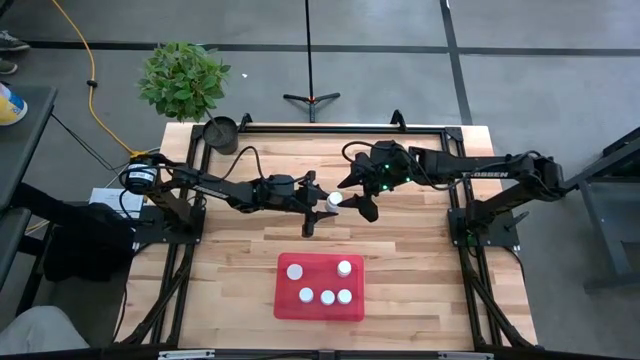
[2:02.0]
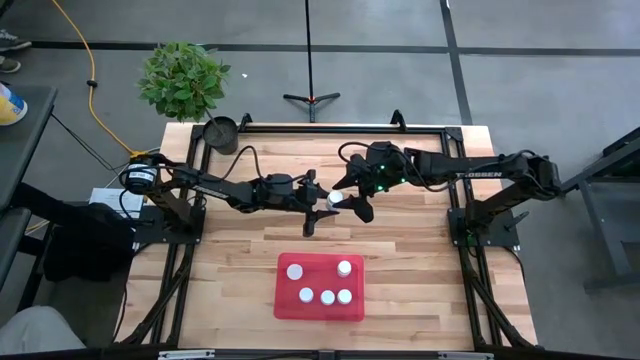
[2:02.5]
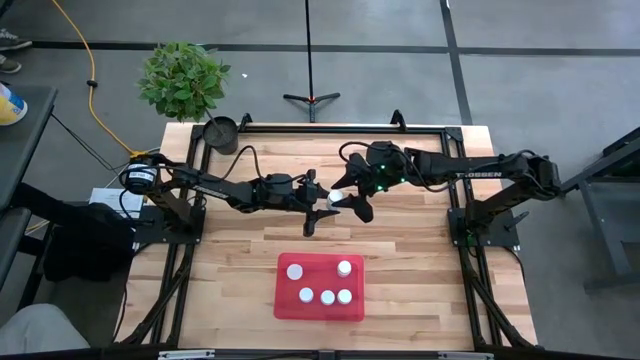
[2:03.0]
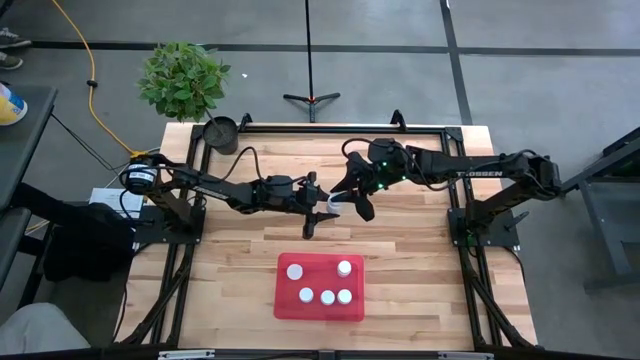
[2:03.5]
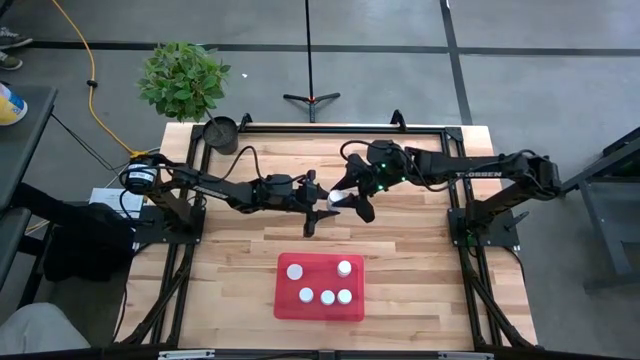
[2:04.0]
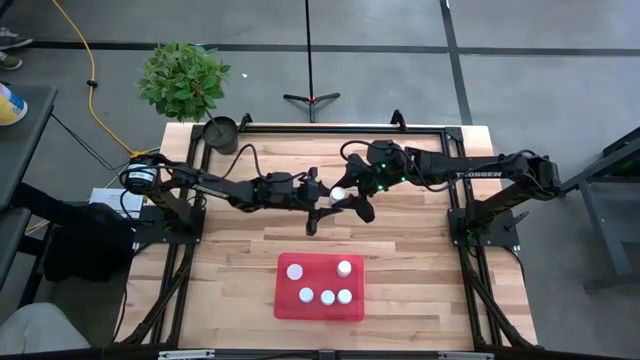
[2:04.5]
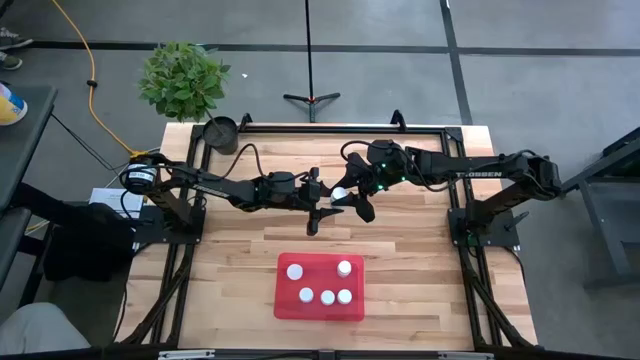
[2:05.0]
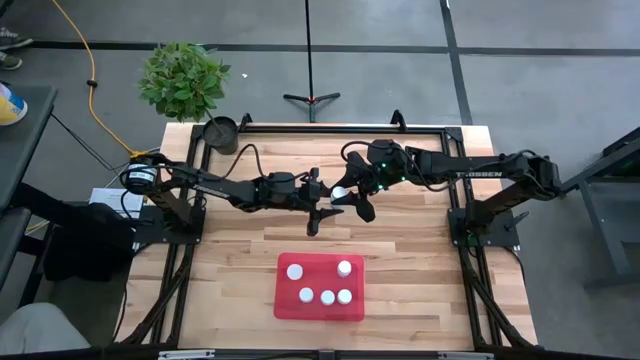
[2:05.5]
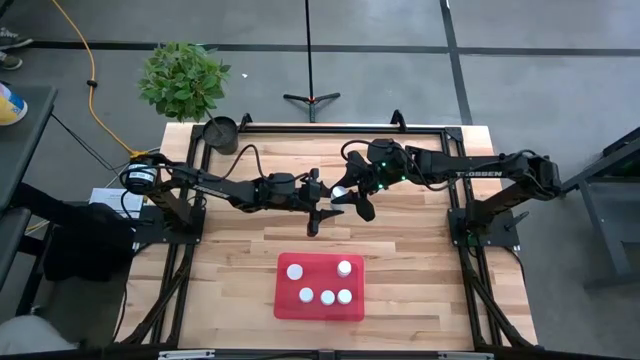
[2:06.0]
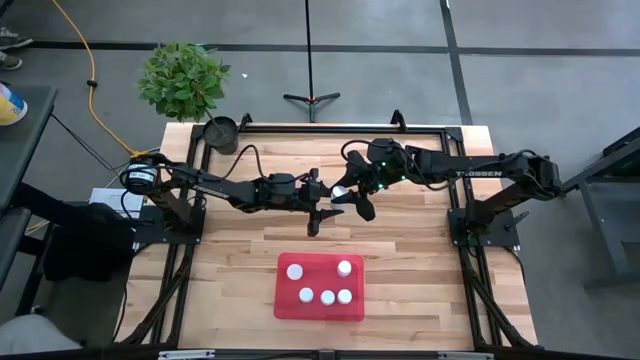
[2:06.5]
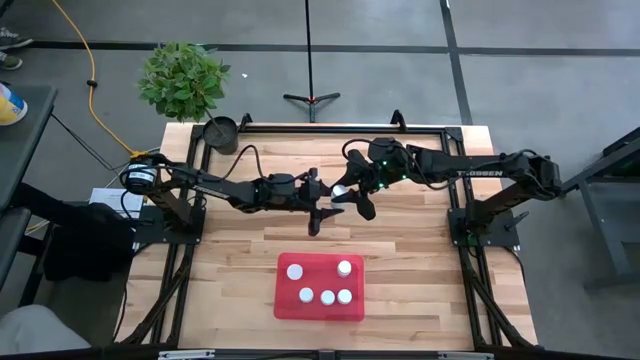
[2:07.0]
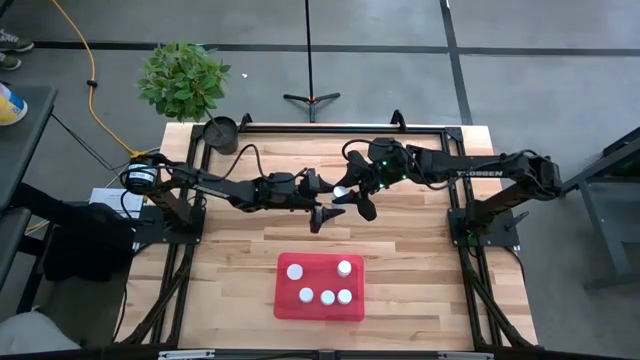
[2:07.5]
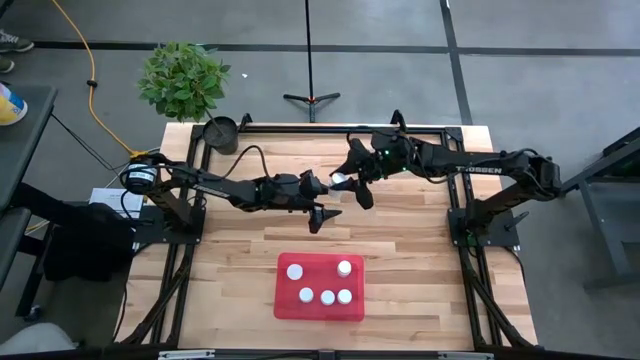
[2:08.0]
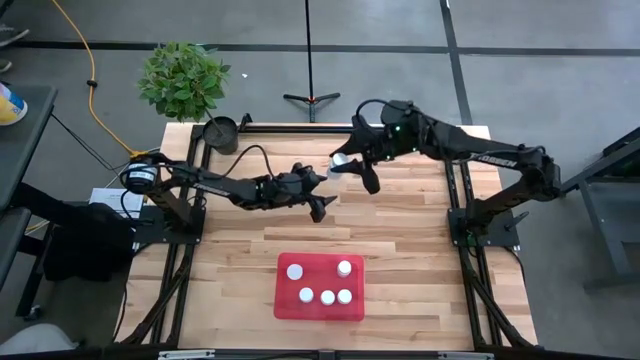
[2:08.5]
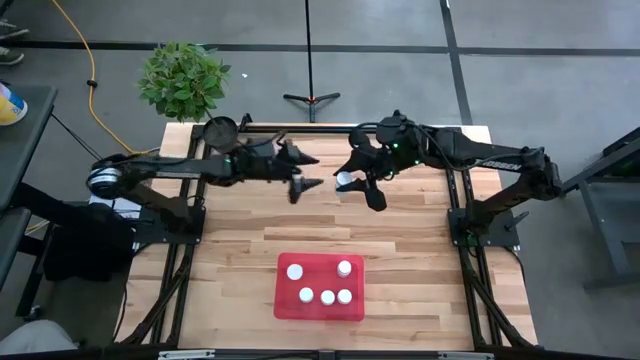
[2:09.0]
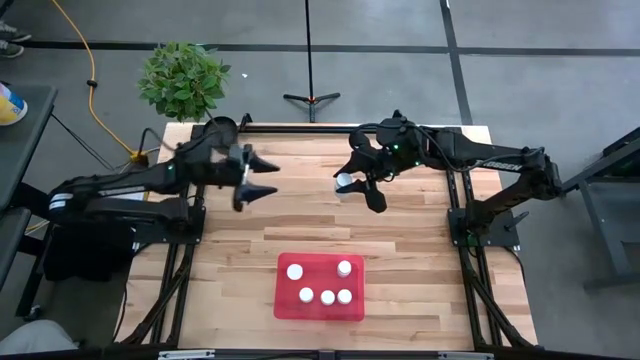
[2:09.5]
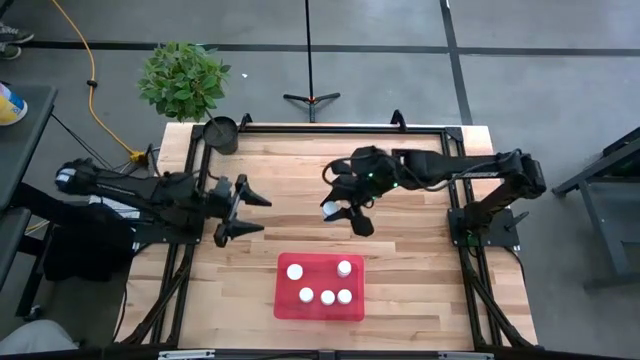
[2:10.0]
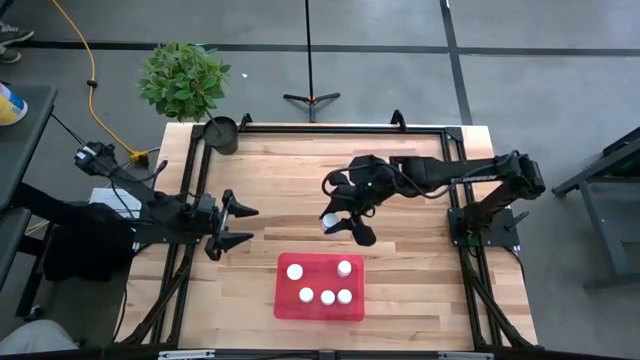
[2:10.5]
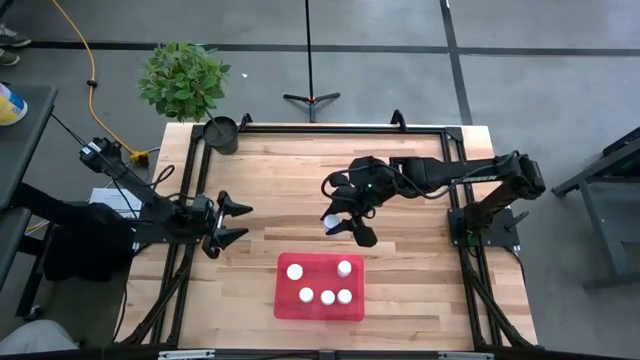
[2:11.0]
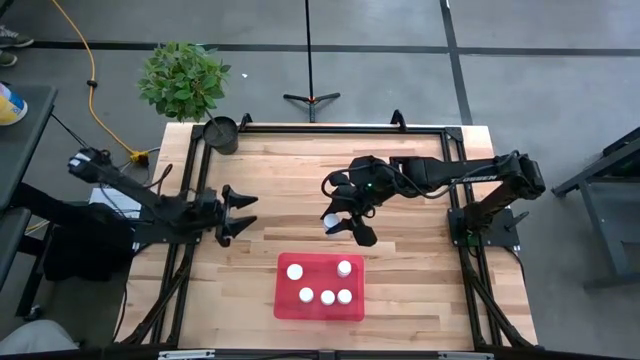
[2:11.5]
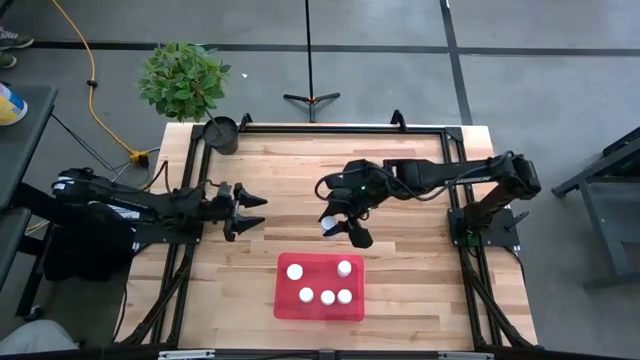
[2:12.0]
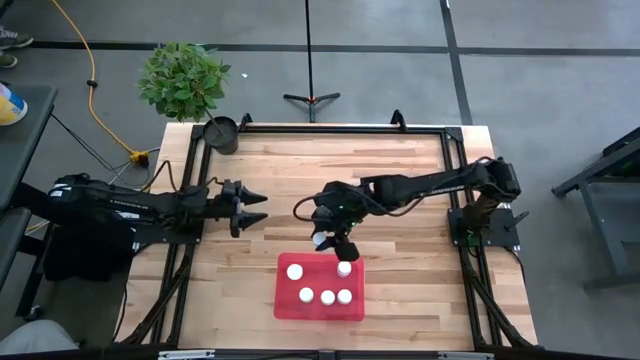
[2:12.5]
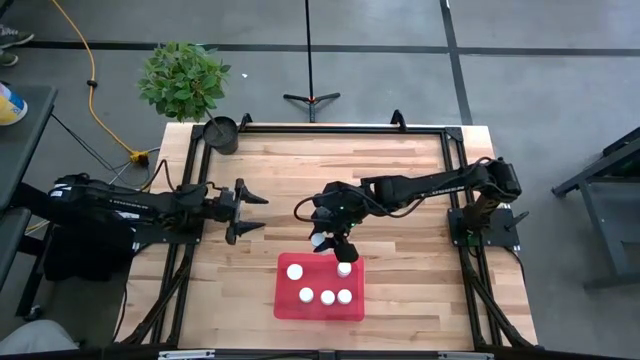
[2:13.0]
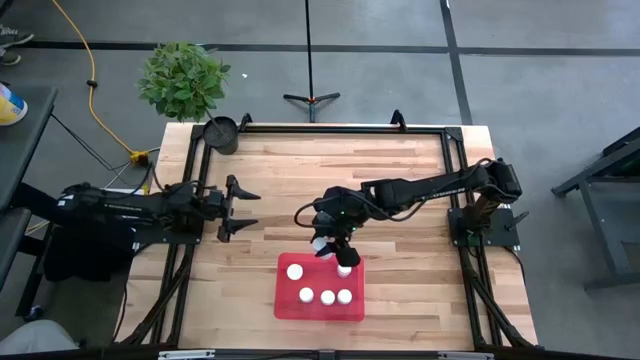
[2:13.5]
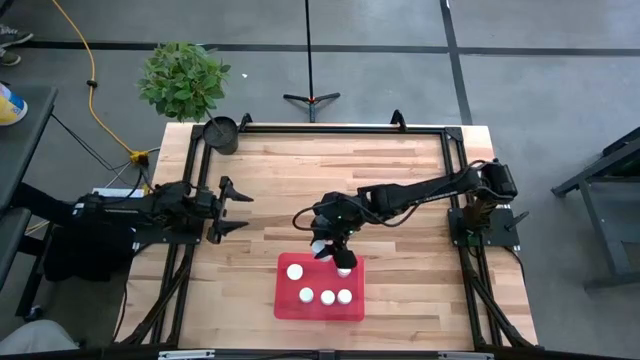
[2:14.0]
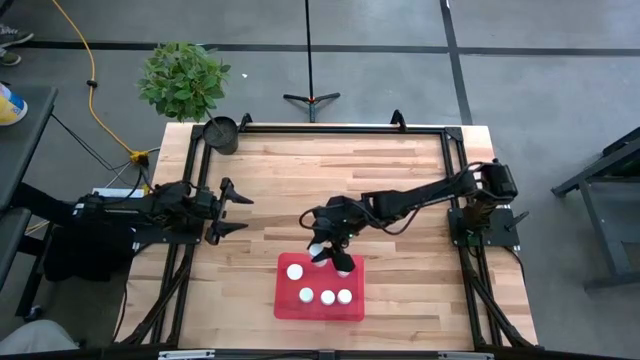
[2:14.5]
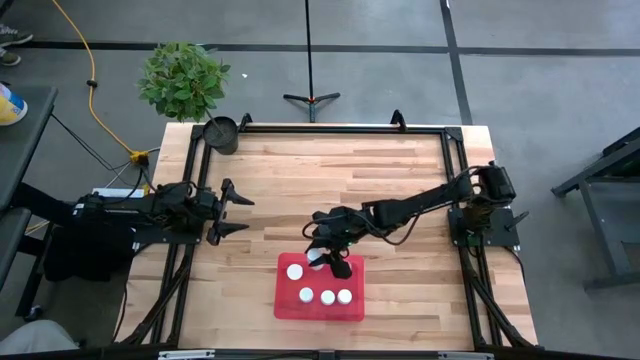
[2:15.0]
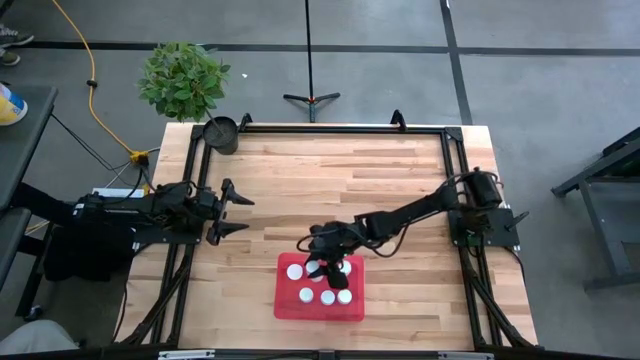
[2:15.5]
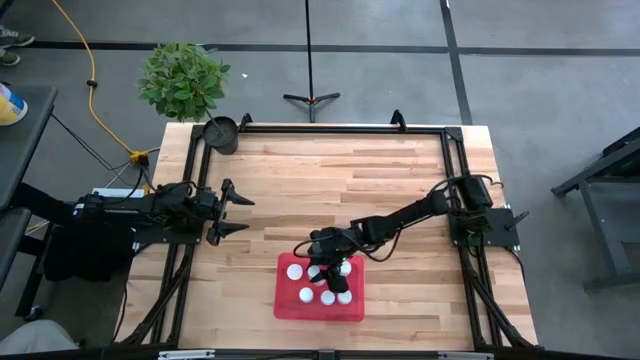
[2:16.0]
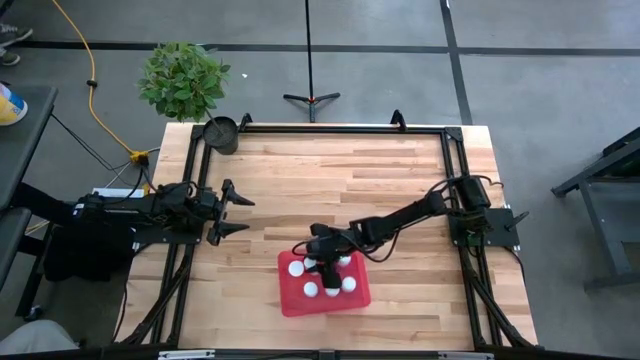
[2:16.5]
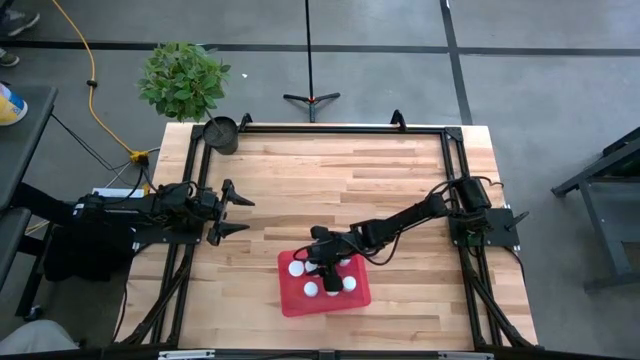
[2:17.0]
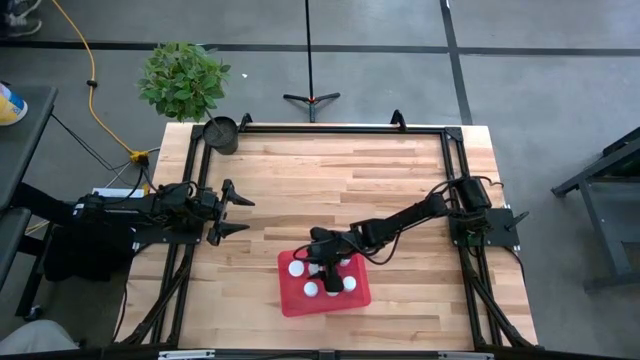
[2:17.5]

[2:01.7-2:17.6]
Task: Pick and place pill bottles into a basket
Put the white pill bottle into the red bin

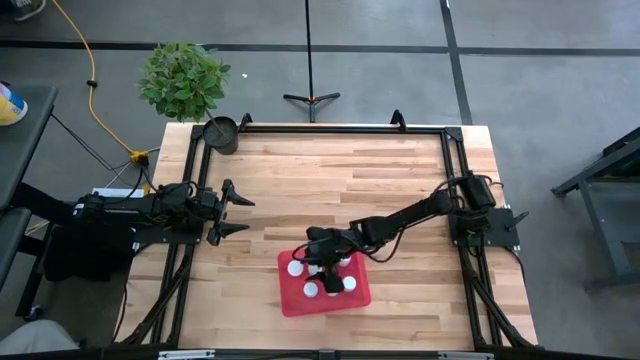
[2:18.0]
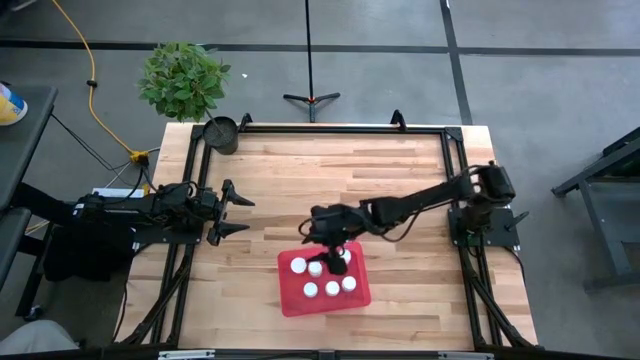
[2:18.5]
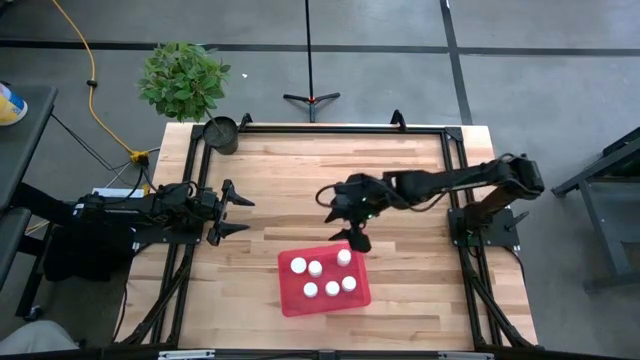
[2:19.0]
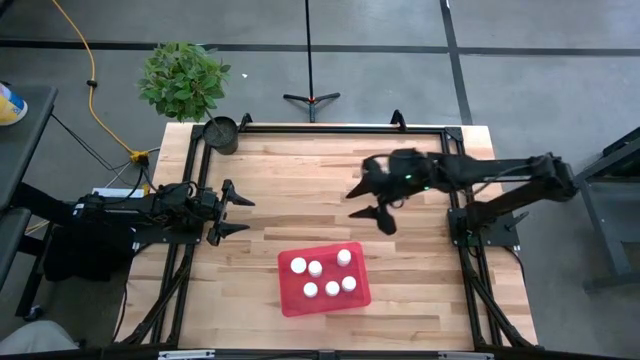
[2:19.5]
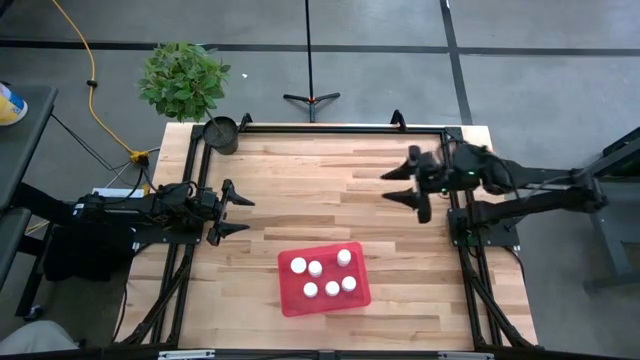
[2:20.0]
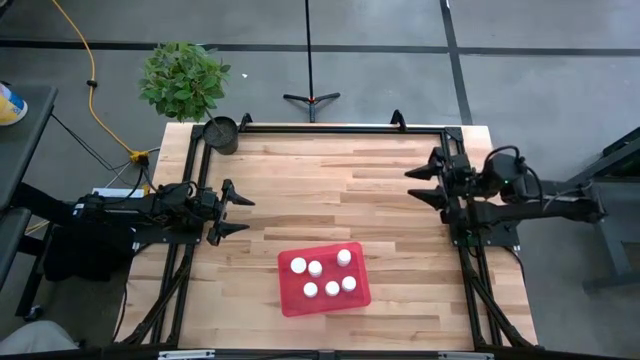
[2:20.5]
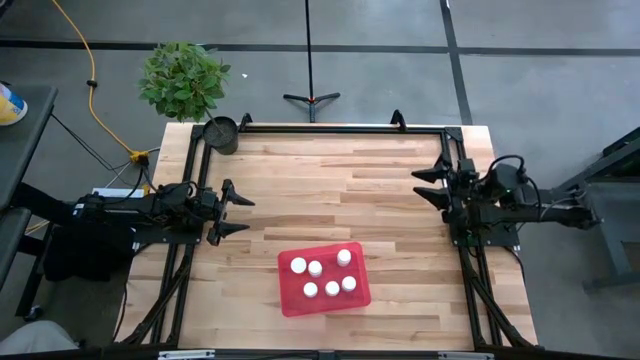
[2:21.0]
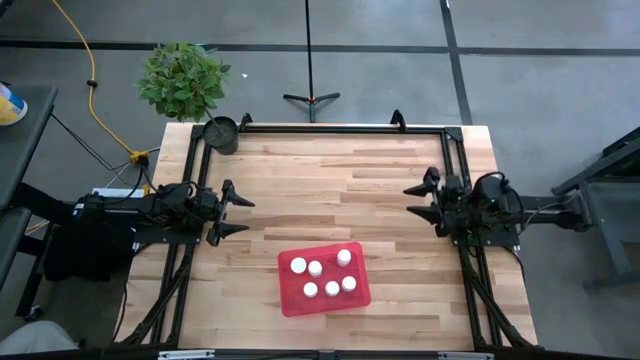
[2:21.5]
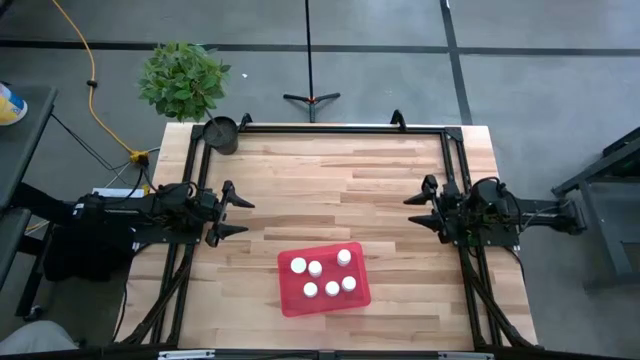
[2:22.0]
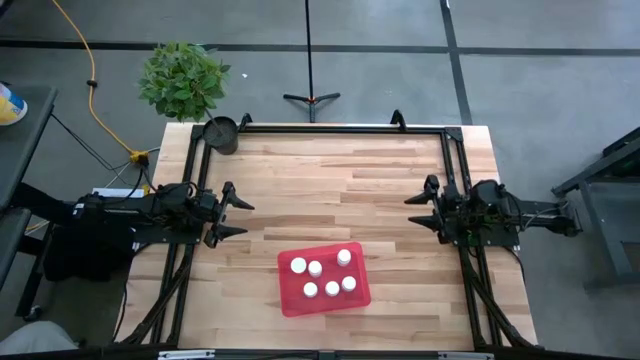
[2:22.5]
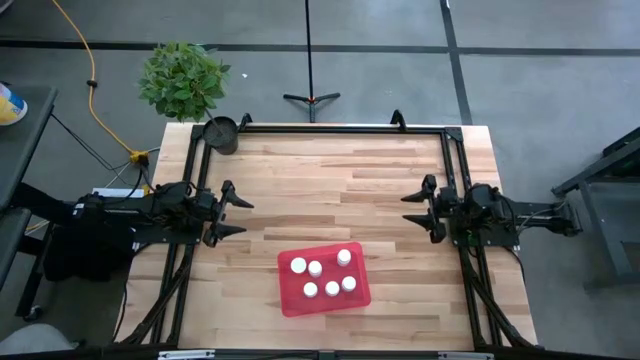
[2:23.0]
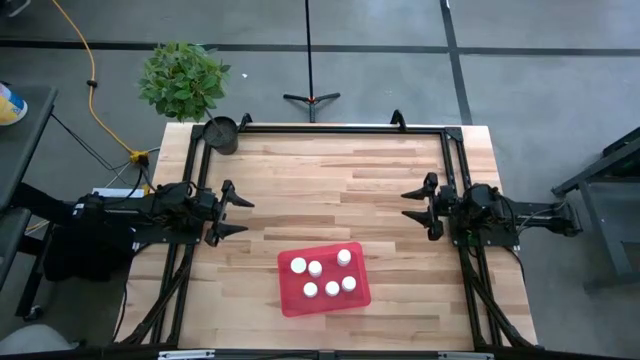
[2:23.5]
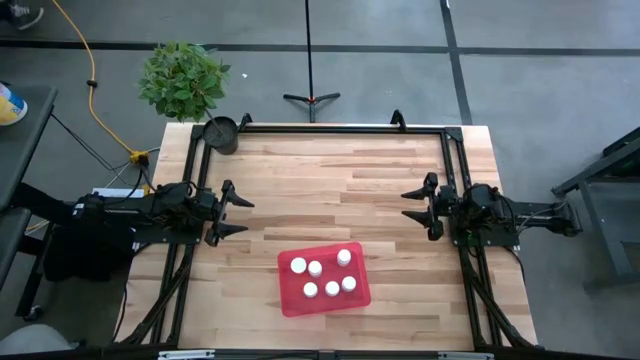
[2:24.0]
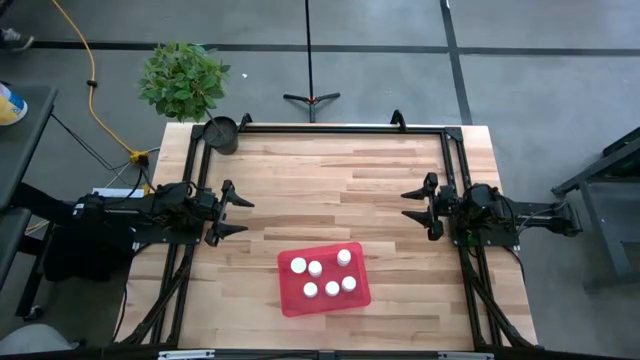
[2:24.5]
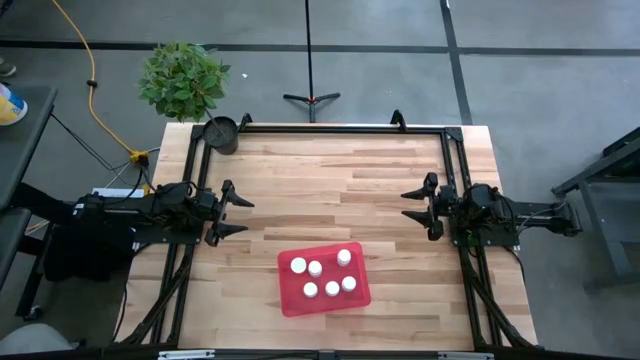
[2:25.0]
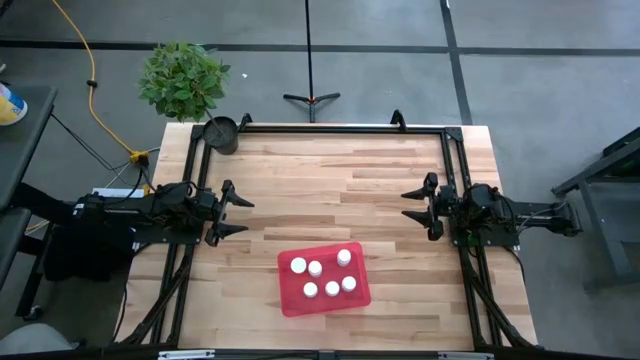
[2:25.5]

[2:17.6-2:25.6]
Return to Home Position
